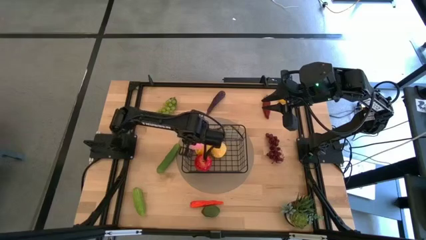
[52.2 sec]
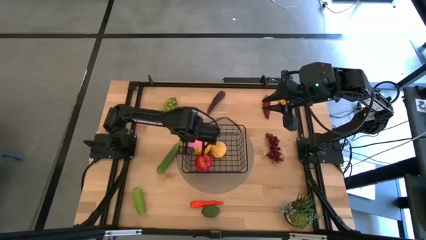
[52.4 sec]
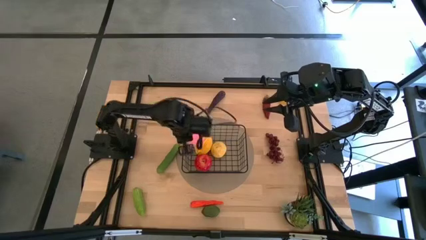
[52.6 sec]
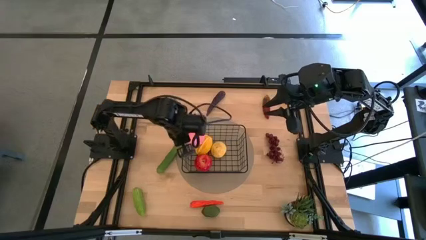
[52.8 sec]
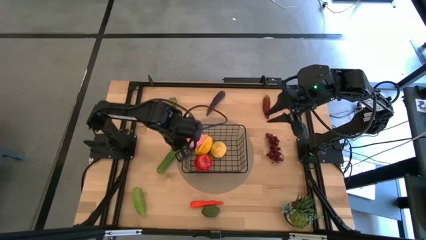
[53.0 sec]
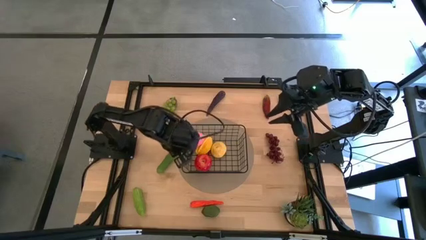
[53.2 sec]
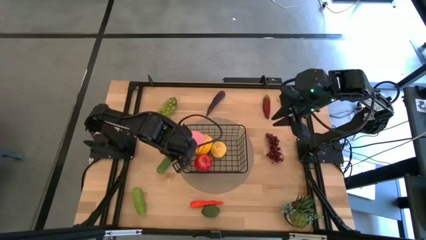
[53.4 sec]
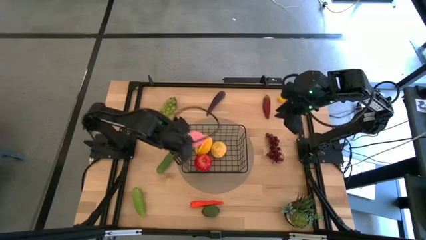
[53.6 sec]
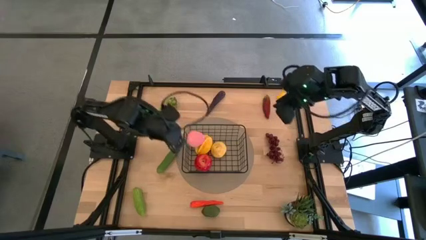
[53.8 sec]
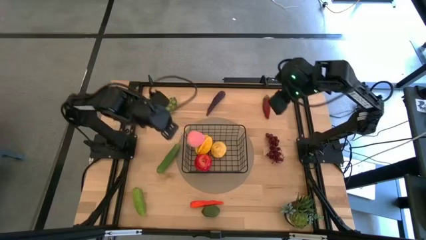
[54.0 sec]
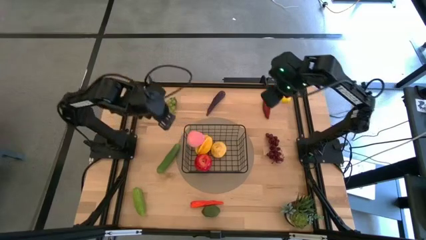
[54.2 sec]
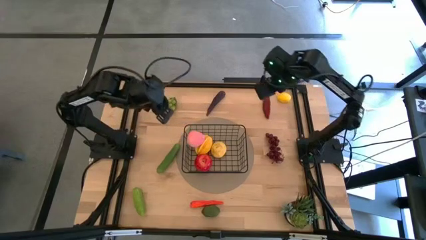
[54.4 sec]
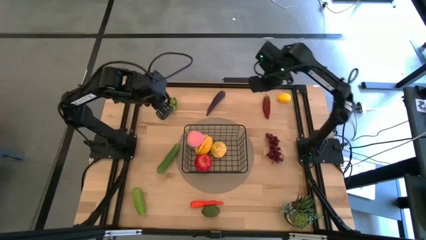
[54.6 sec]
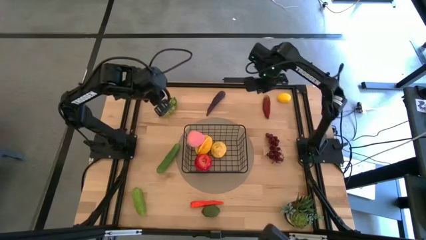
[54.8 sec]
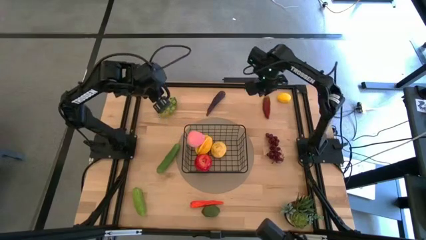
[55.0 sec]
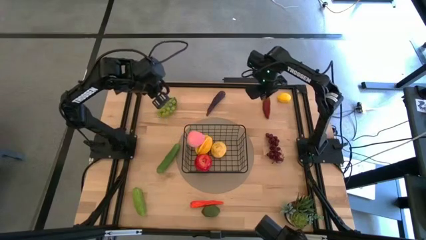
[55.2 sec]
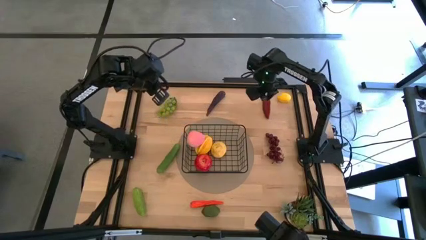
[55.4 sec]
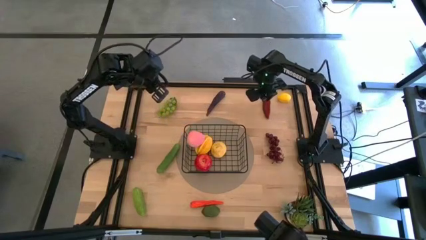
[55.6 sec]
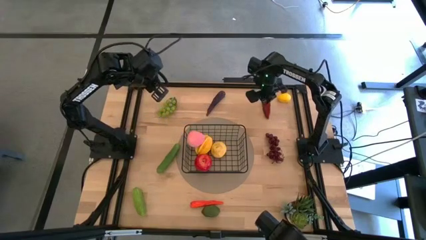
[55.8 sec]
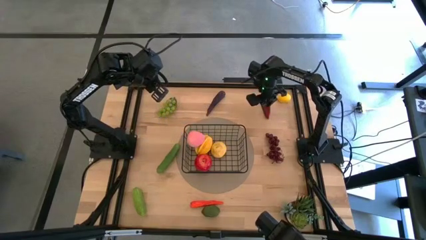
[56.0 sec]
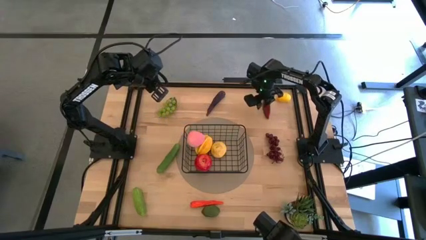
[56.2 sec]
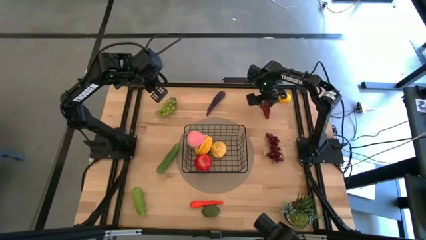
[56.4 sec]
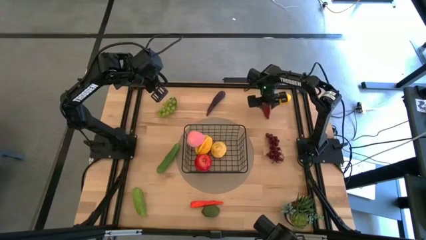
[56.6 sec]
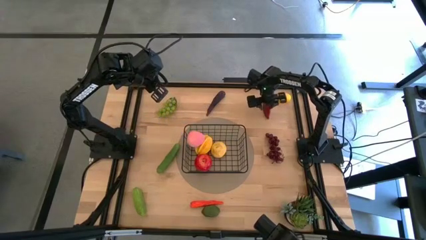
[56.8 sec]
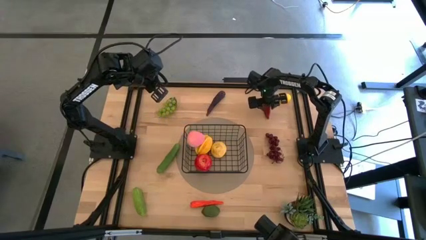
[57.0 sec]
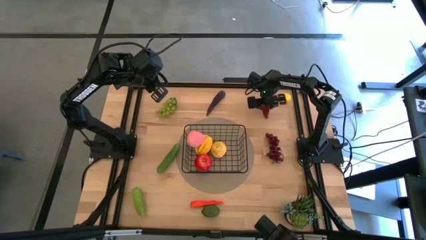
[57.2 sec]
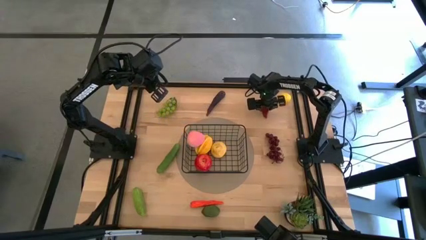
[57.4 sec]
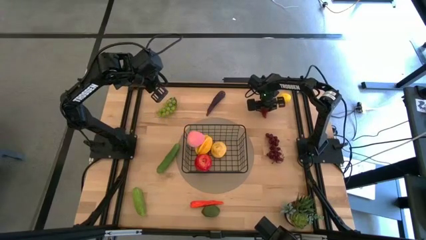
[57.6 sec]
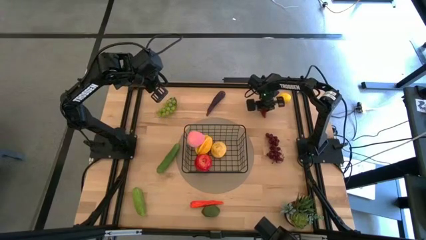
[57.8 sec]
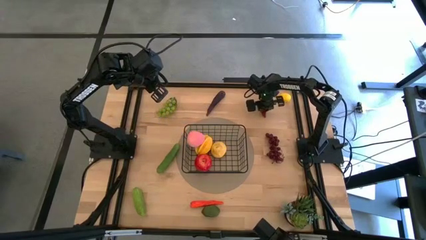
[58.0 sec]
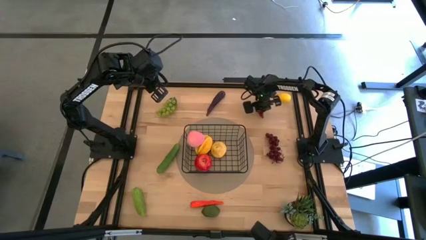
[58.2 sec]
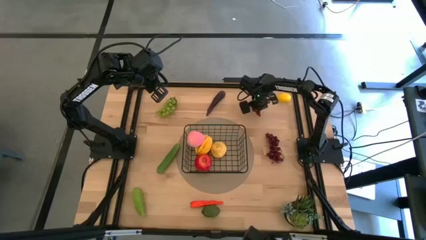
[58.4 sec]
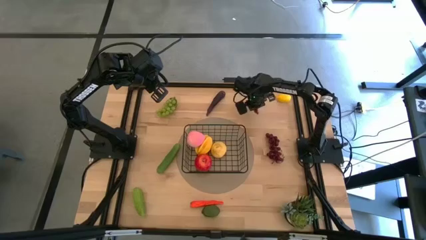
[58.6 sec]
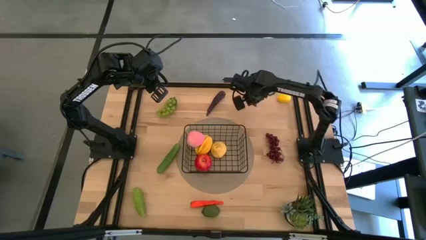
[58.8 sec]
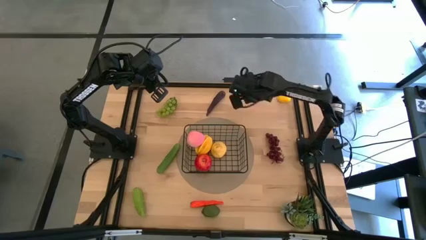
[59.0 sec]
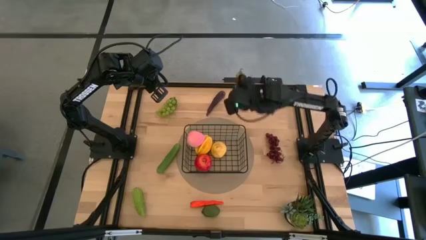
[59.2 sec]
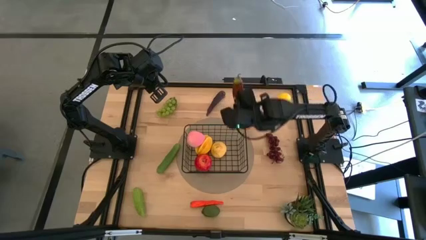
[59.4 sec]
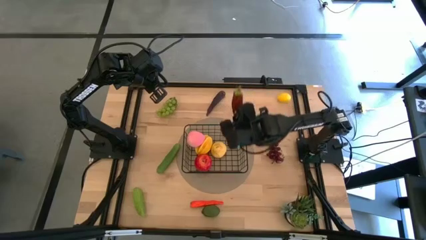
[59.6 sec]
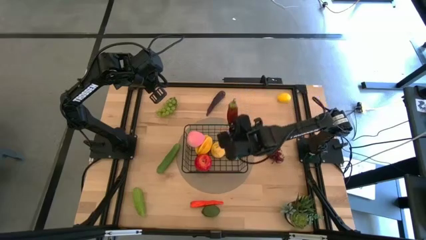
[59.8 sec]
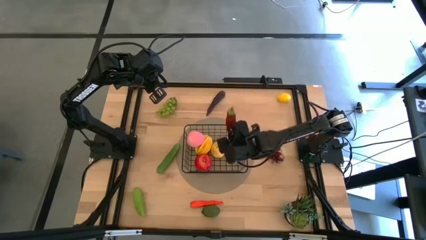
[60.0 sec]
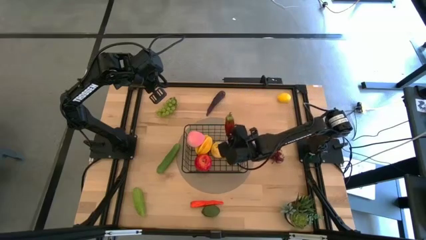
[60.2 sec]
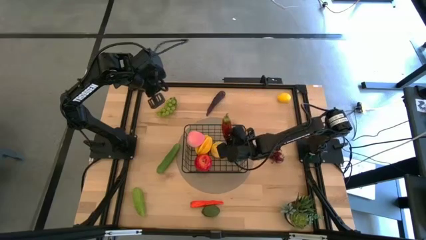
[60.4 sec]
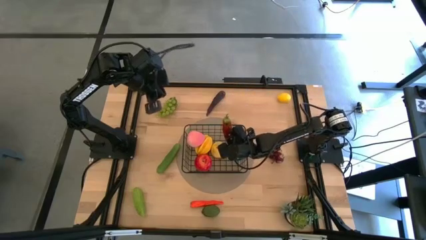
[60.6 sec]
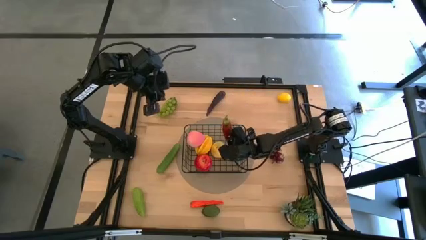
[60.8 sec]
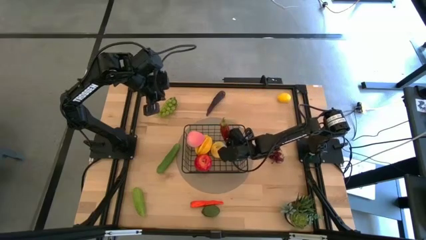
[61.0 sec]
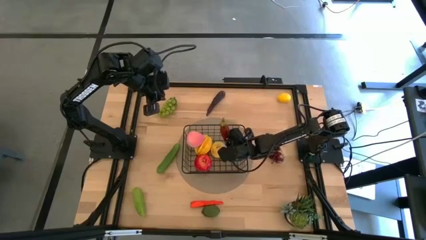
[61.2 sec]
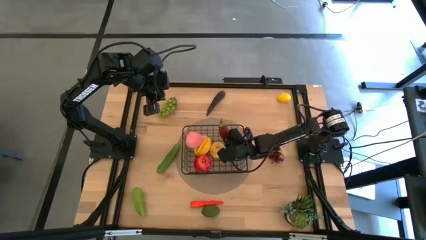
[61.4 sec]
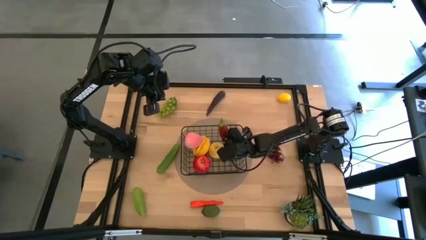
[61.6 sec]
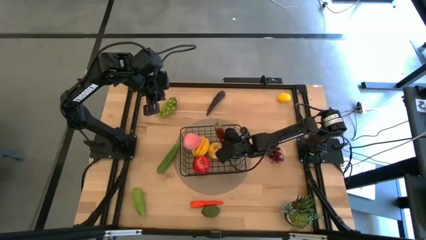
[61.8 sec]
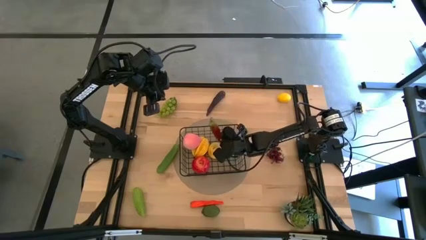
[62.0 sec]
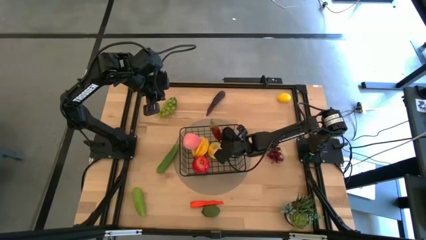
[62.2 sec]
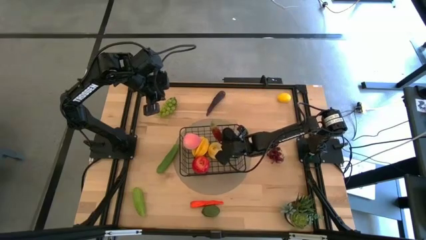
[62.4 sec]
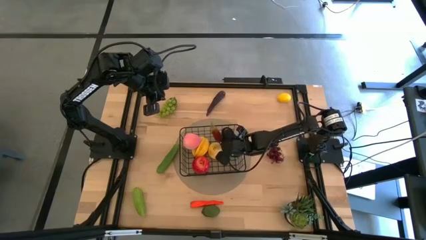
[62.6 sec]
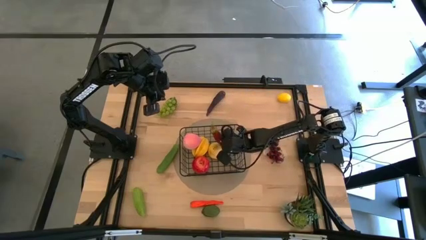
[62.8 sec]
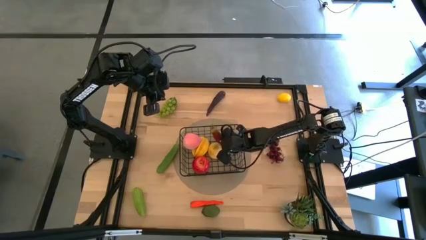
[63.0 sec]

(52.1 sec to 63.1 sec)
Task: Build produce basket
Put the red chili pepper into the black wire basket

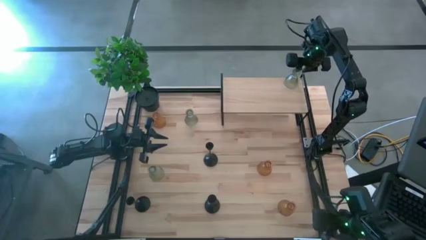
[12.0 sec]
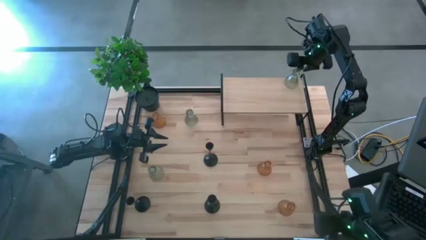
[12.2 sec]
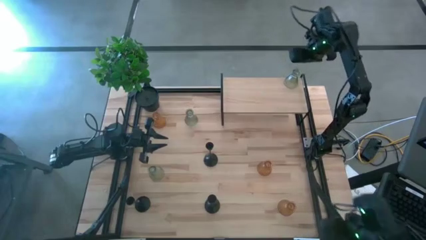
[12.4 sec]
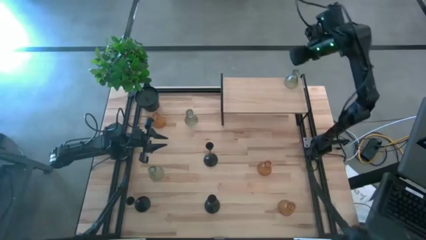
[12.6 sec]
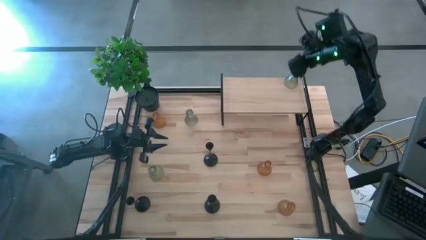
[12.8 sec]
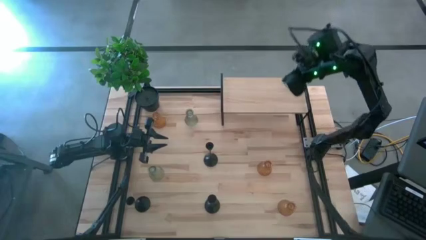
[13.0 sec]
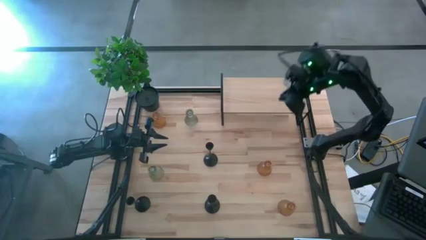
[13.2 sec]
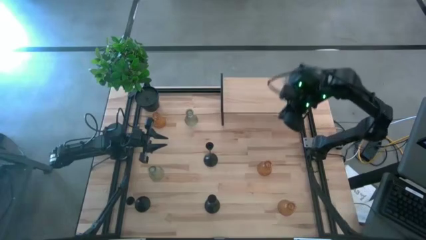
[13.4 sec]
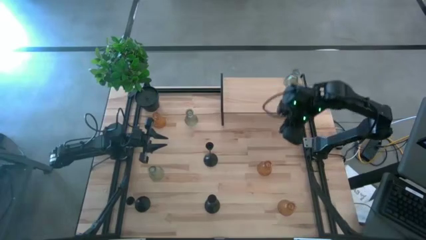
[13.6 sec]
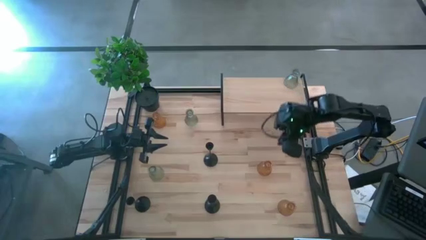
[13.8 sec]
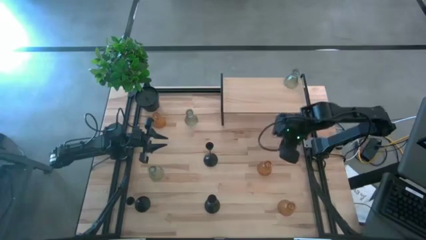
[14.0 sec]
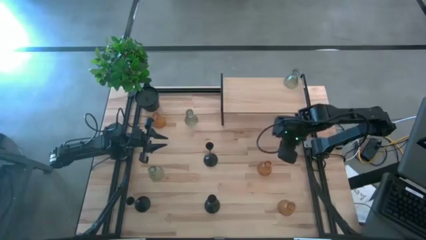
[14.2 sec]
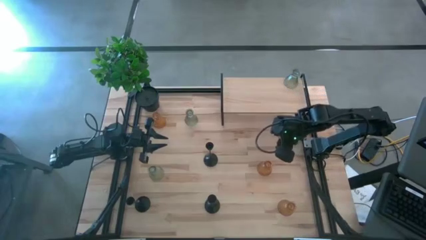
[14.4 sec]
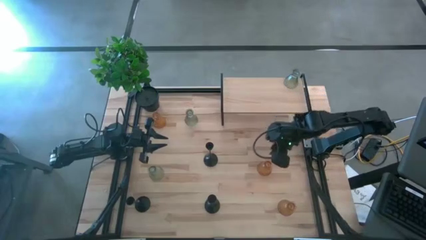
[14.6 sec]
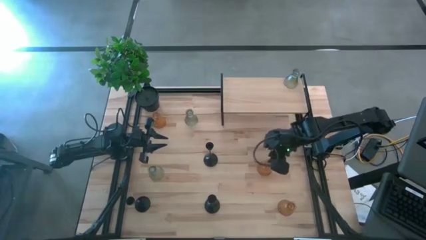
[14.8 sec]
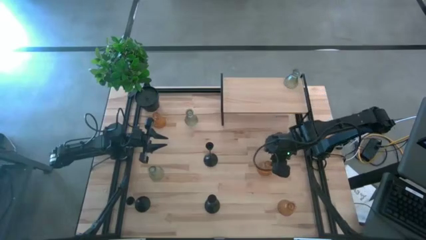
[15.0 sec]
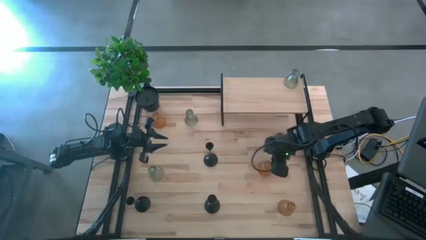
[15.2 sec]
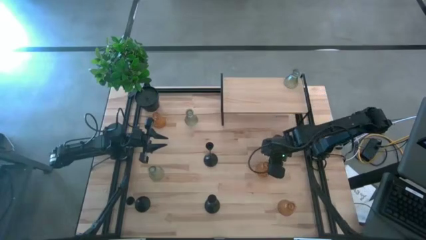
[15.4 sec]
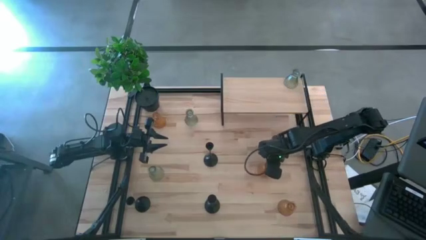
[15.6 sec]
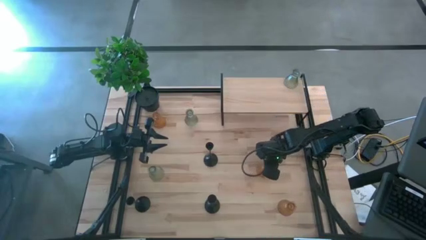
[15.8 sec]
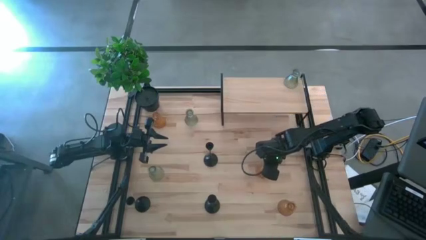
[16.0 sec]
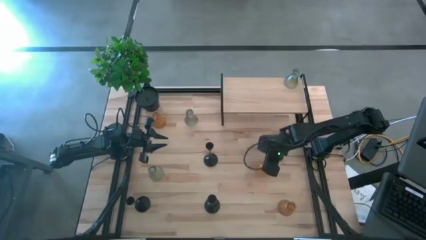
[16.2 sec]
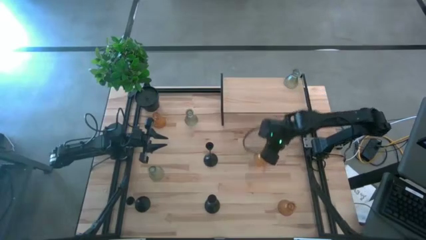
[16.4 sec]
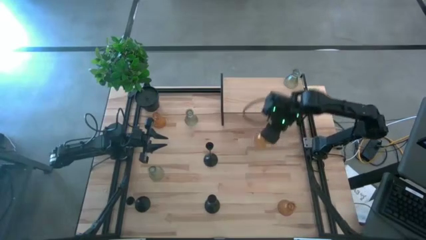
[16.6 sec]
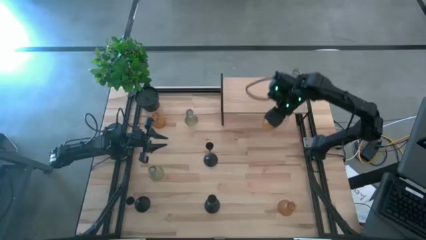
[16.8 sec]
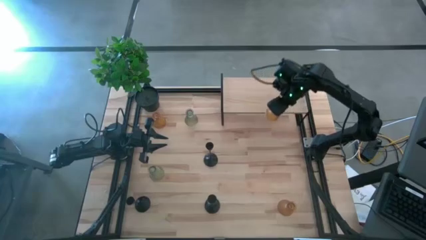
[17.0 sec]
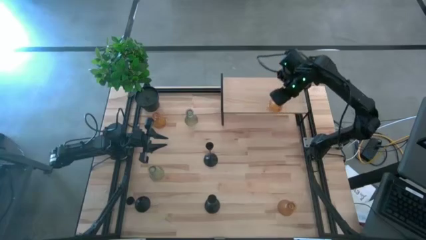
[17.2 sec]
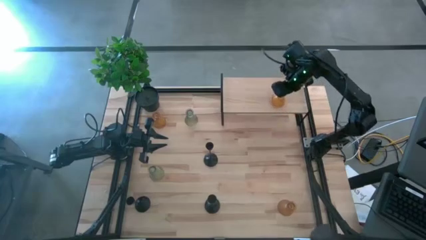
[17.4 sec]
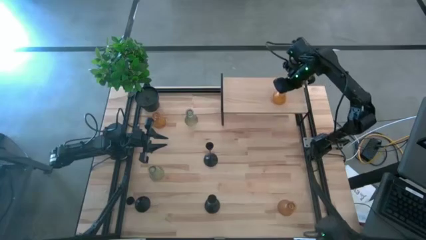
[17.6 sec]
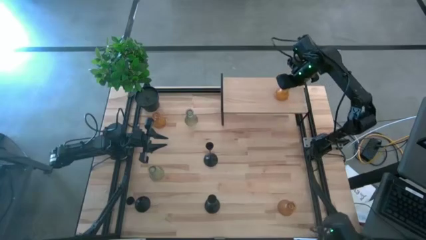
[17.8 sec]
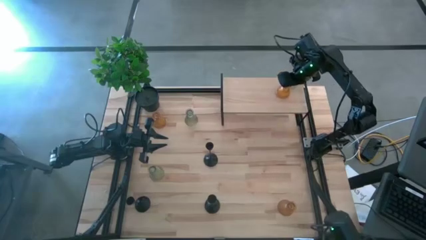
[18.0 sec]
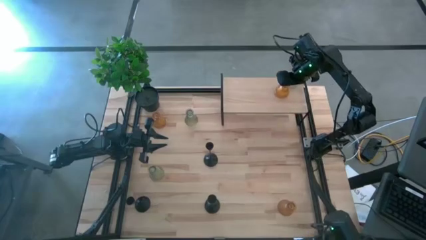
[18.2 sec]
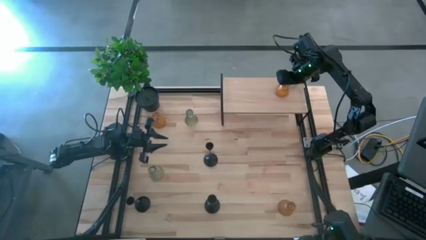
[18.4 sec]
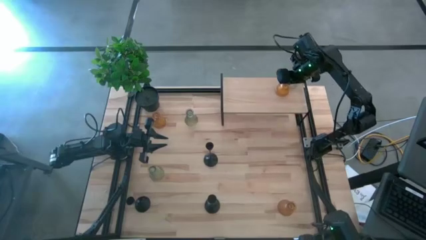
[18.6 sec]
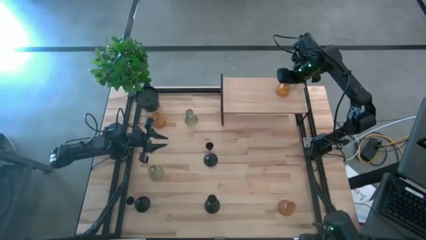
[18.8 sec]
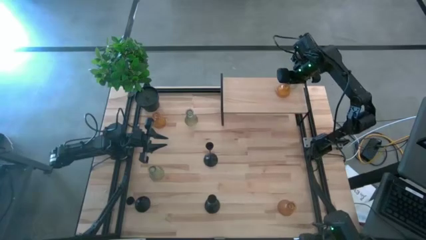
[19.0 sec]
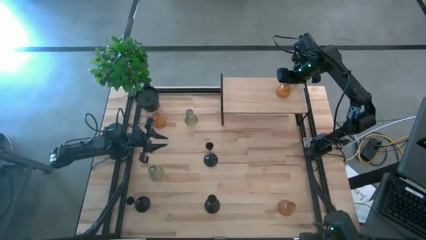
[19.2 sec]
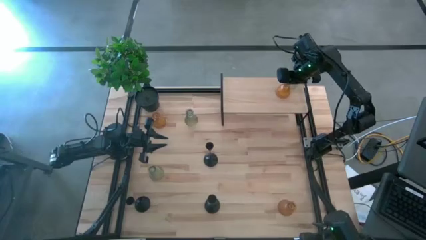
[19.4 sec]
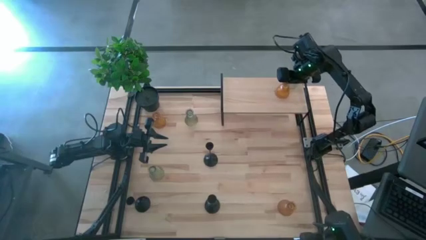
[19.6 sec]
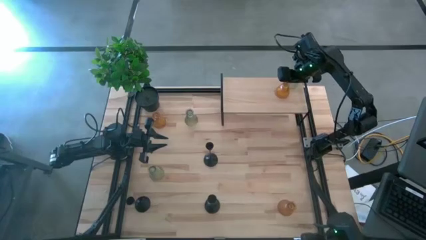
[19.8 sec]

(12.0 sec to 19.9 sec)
Task: Pick & Place candle stick holders
Put the middle orange glass candle holder on the shelf
